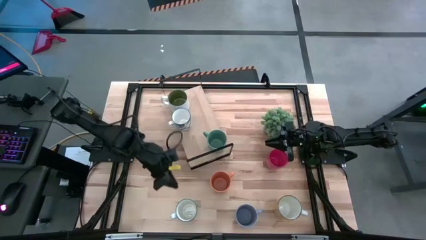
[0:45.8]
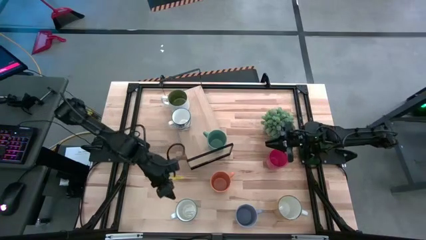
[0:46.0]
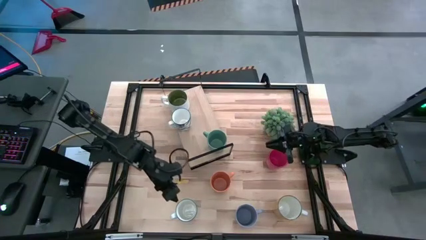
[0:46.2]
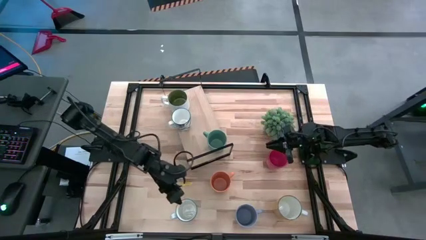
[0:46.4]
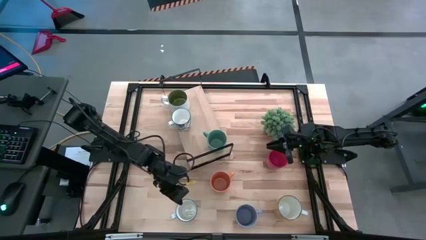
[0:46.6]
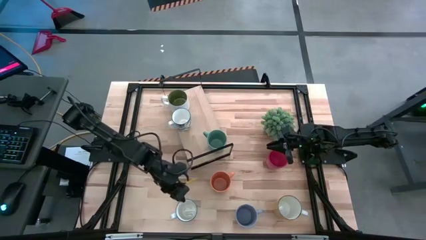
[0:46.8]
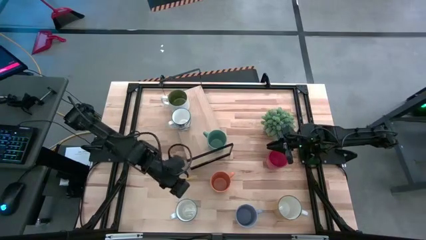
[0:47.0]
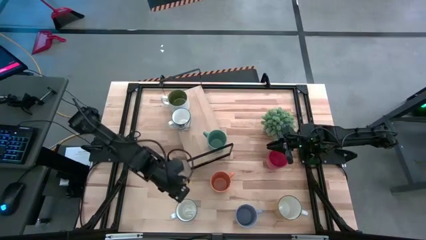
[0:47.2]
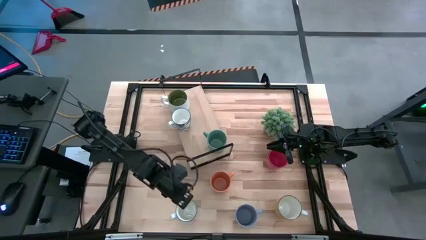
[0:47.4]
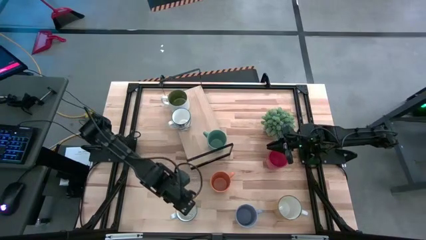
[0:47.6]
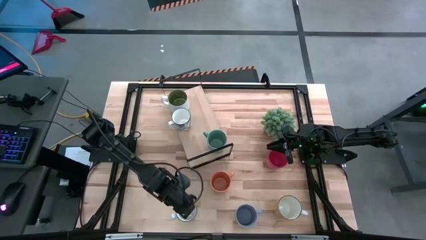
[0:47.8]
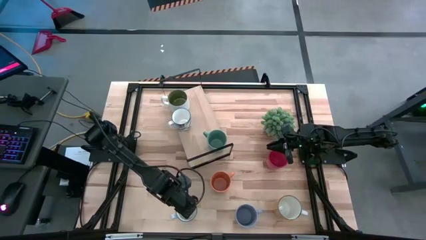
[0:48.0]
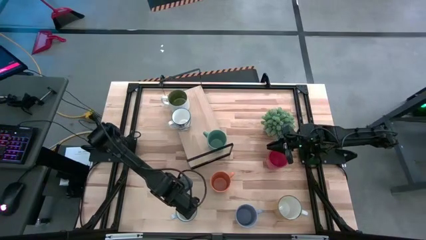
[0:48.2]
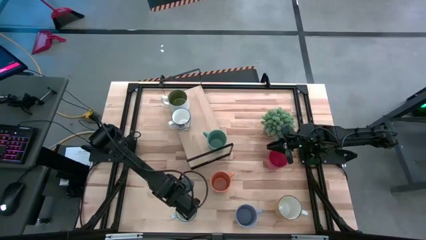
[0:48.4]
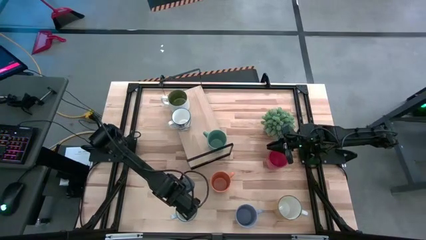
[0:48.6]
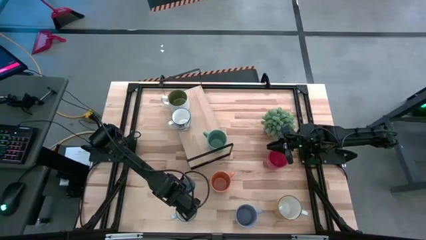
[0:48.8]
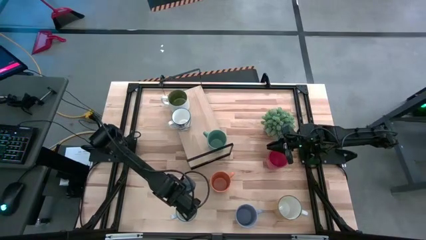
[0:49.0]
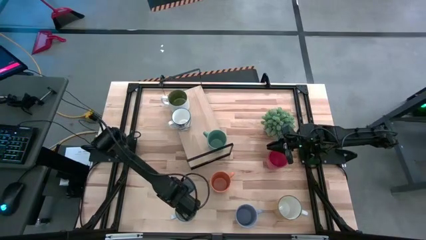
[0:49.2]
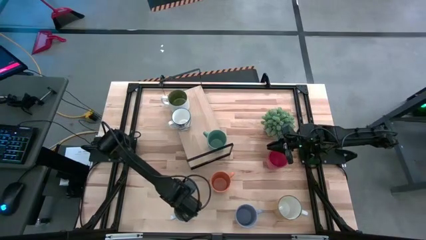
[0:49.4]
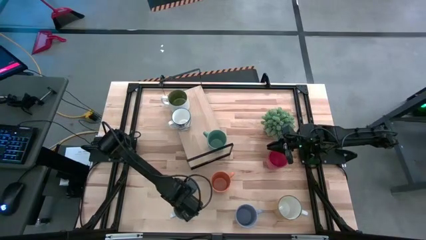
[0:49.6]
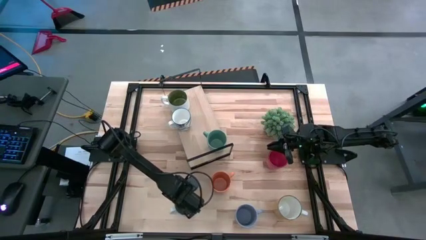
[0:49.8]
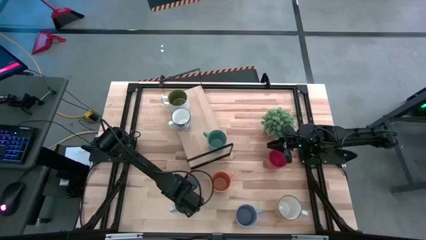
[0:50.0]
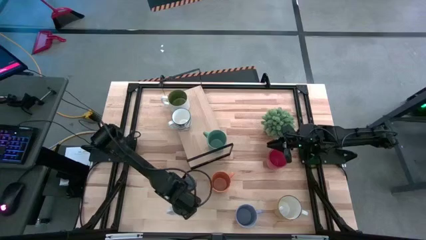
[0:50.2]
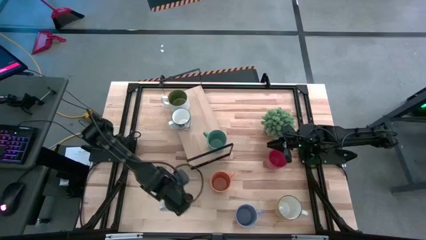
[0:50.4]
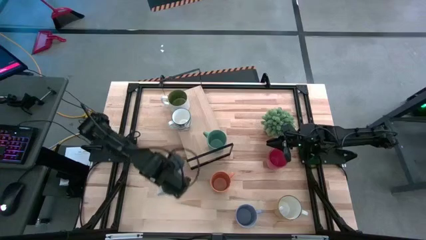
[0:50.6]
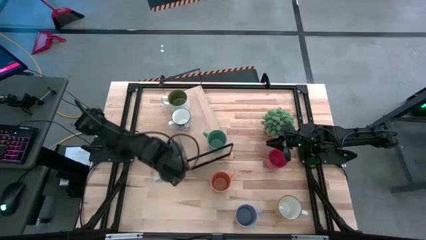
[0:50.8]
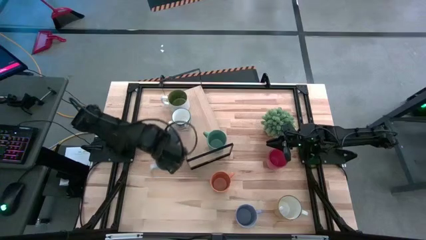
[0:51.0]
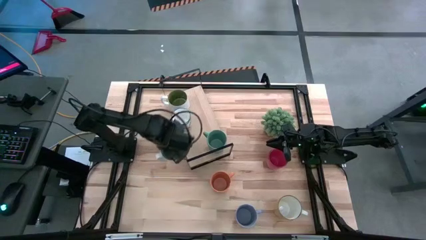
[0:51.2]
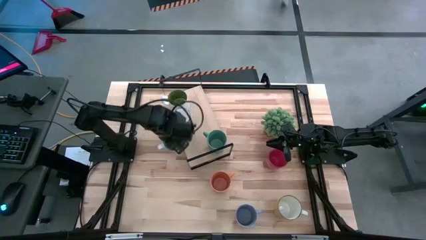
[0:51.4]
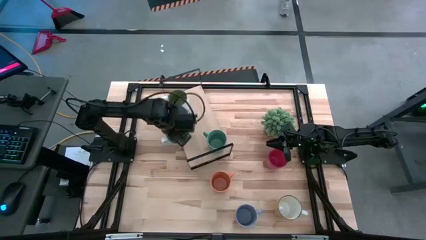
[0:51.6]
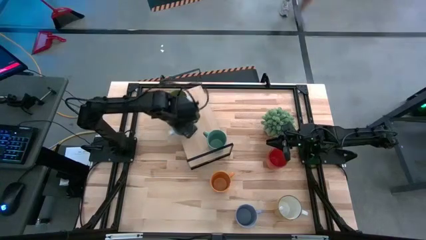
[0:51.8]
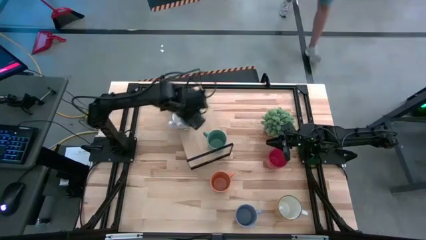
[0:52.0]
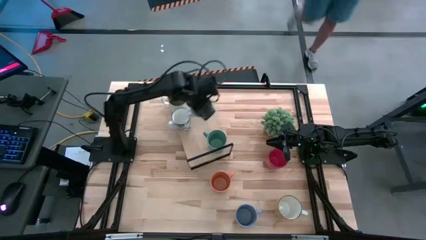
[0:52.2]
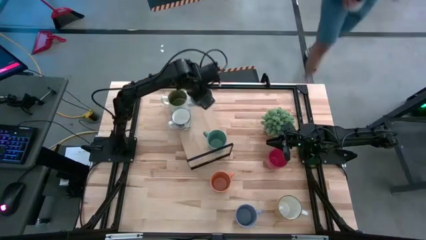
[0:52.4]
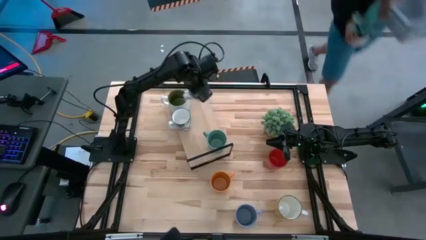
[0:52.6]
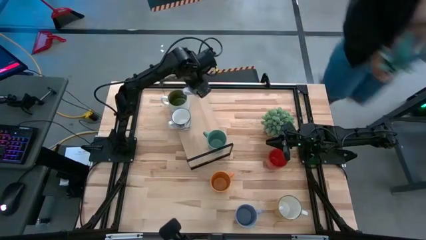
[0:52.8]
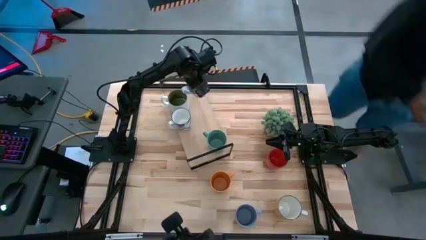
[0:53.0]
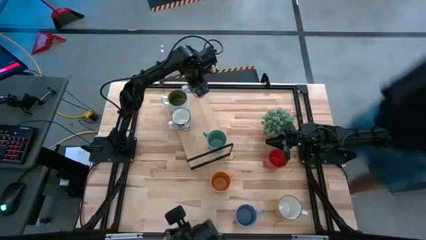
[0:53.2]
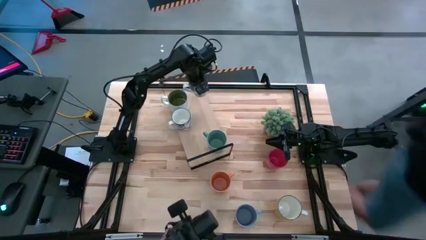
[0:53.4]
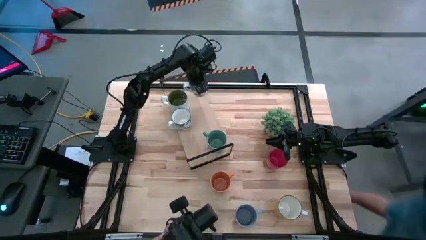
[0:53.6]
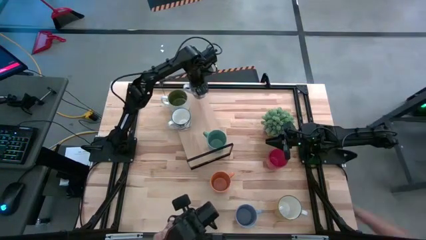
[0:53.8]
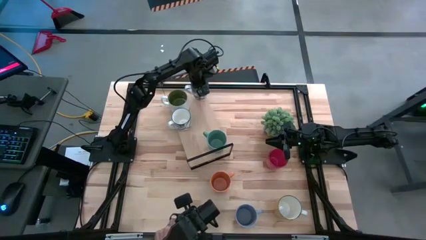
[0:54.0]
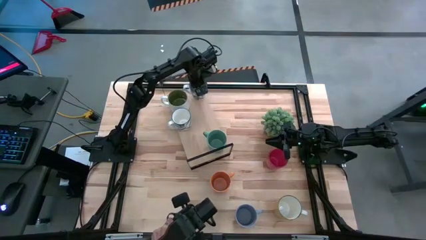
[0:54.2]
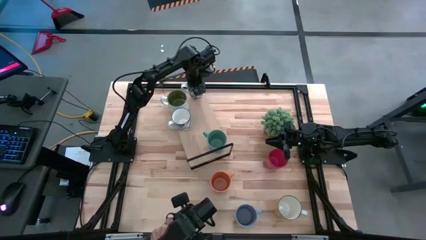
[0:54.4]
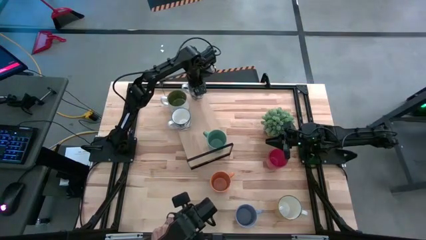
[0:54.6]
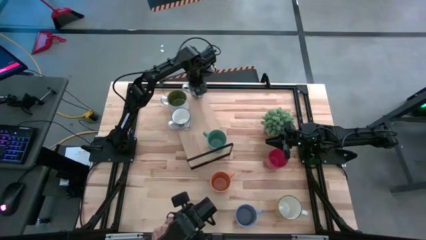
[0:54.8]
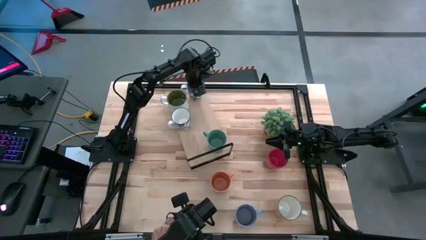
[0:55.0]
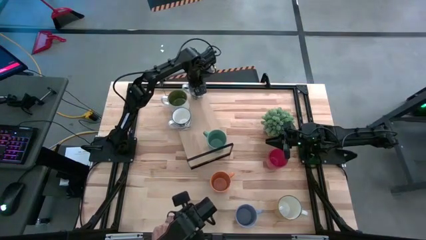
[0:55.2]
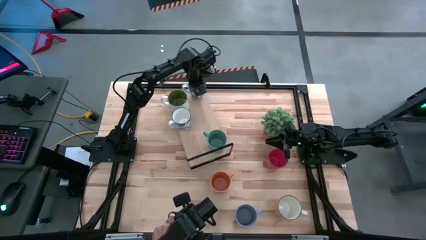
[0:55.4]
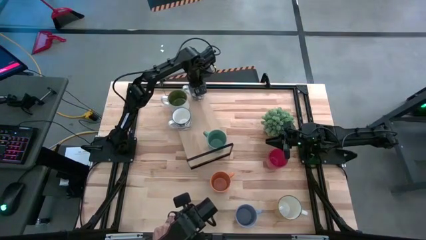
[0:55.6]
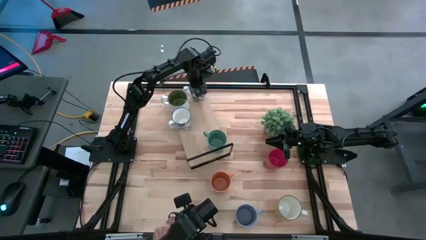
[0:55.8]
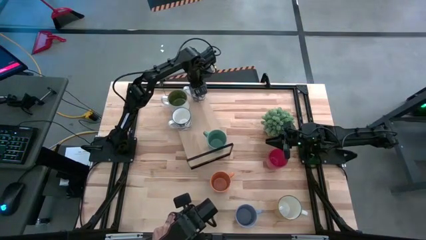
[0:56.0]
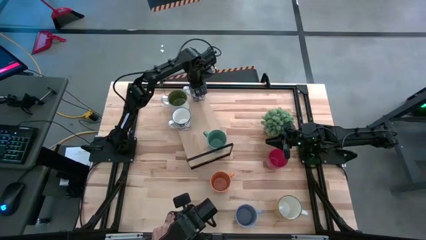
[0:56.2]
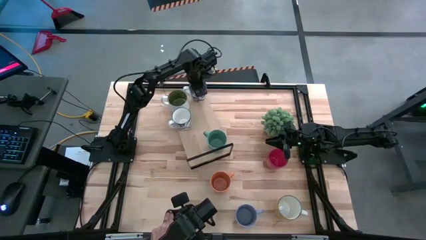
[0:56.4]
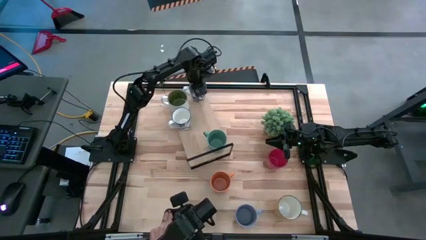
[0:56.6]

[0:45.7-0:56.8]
Task: Place coffee mugs
Put the blue mug on the shelf
